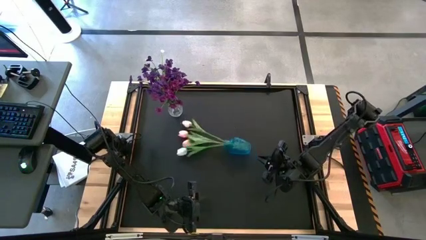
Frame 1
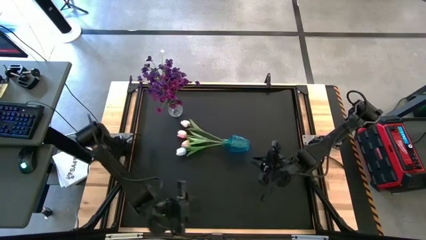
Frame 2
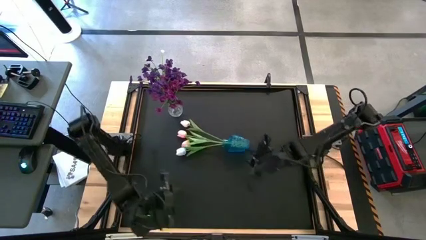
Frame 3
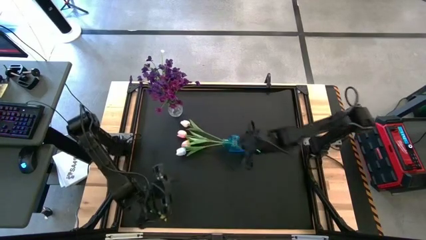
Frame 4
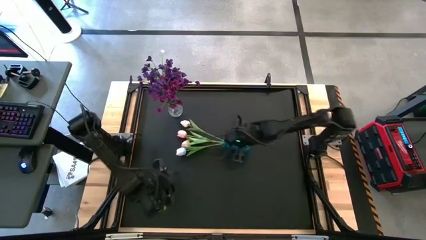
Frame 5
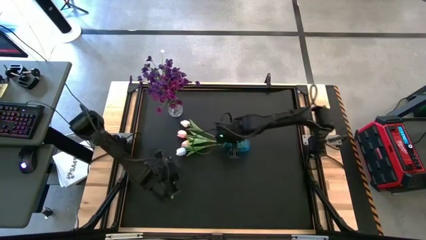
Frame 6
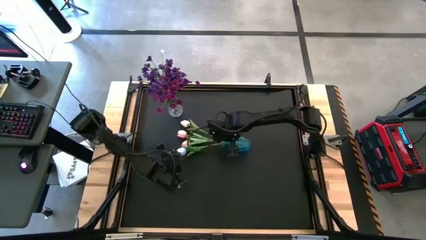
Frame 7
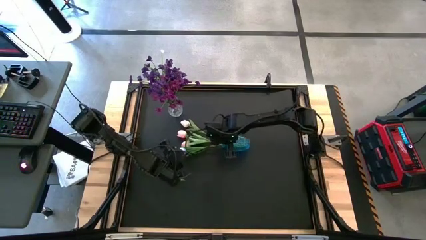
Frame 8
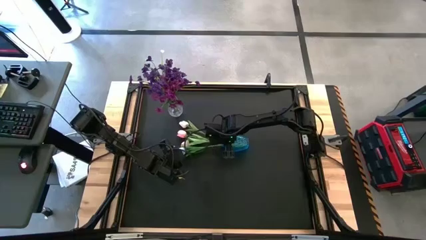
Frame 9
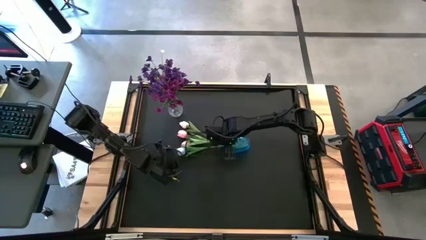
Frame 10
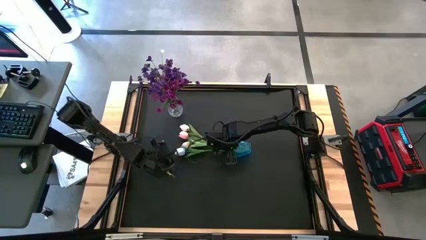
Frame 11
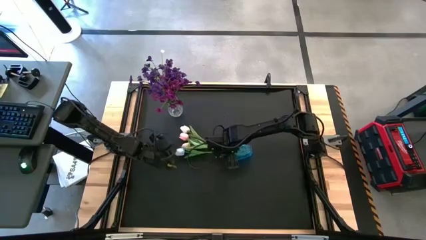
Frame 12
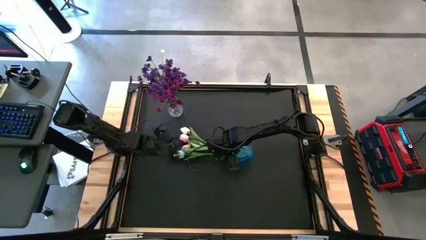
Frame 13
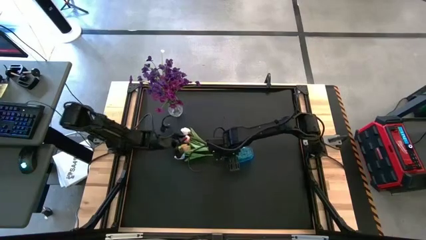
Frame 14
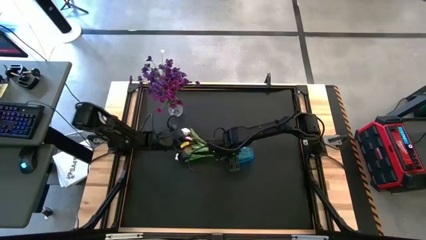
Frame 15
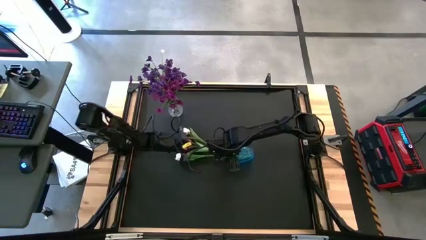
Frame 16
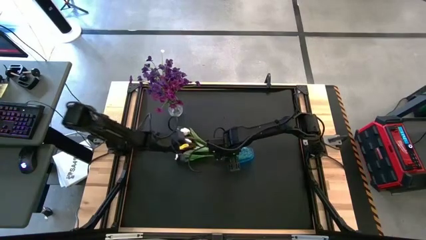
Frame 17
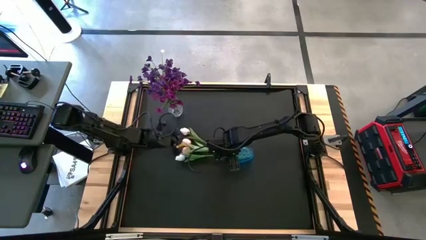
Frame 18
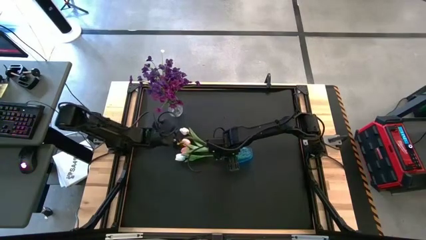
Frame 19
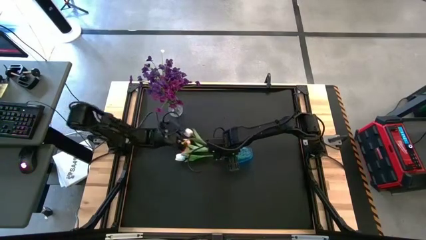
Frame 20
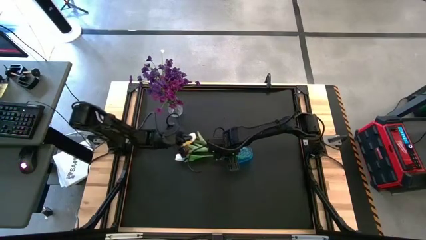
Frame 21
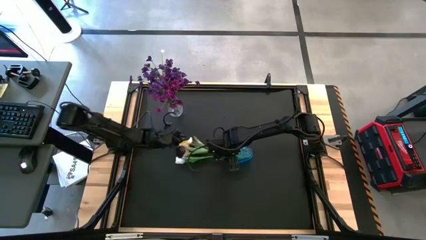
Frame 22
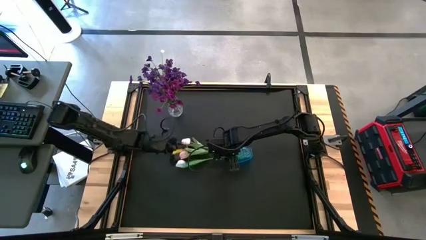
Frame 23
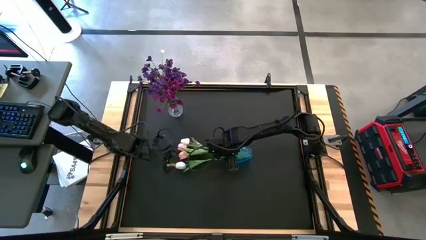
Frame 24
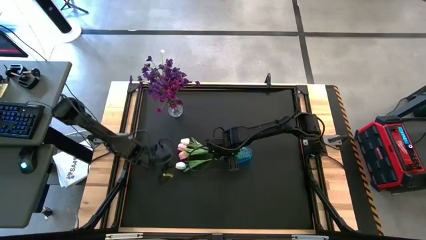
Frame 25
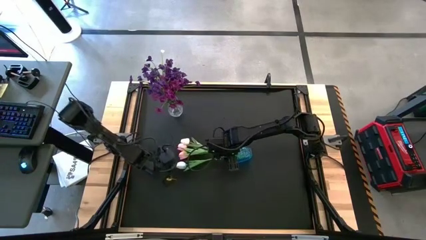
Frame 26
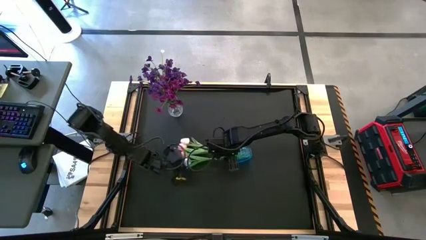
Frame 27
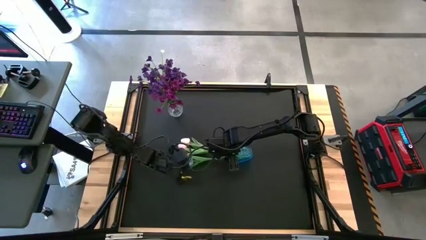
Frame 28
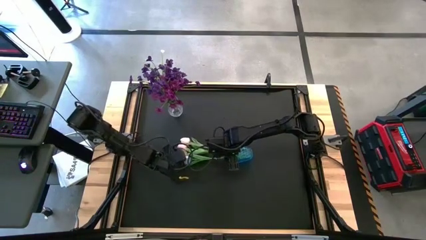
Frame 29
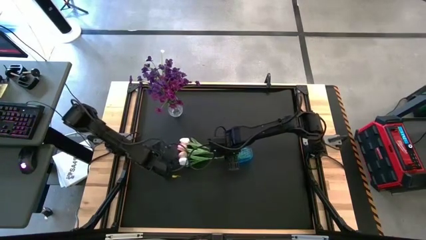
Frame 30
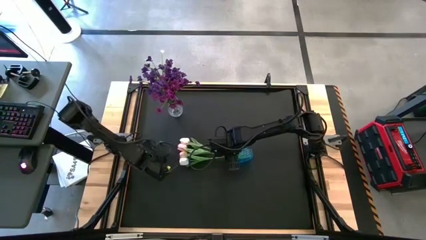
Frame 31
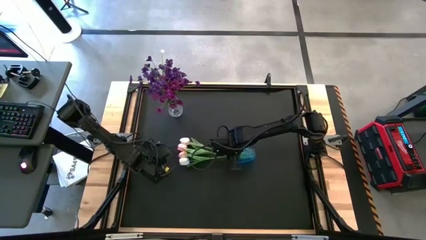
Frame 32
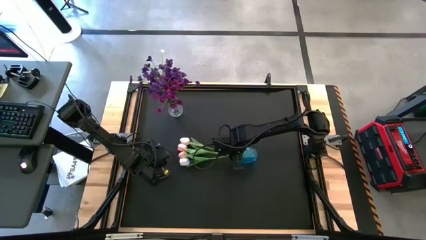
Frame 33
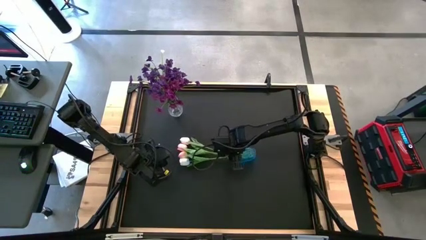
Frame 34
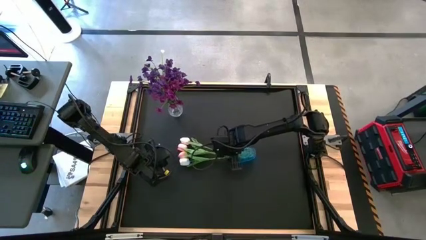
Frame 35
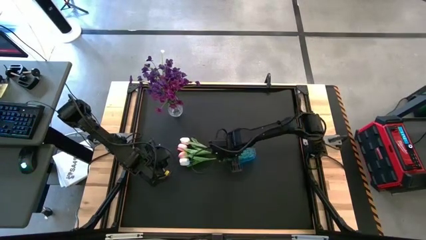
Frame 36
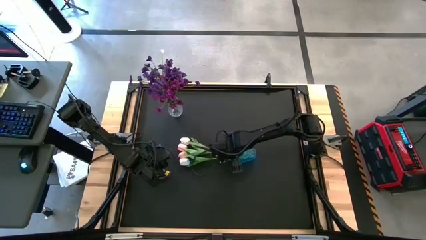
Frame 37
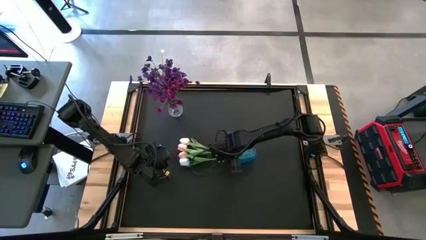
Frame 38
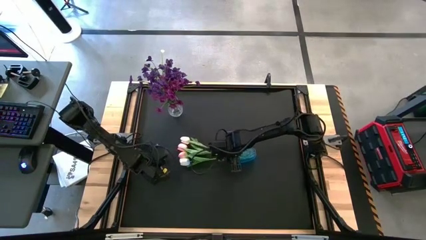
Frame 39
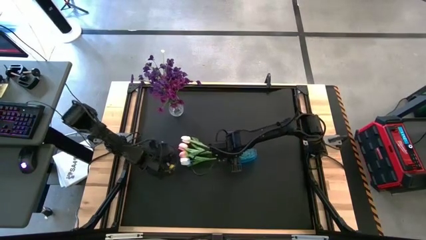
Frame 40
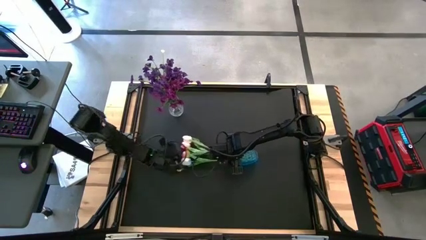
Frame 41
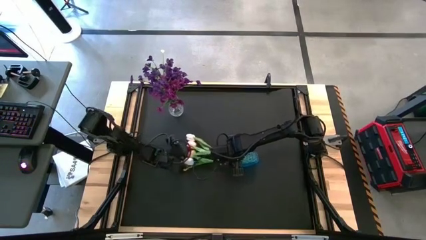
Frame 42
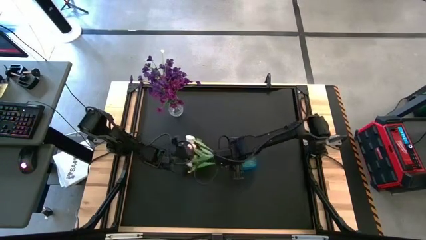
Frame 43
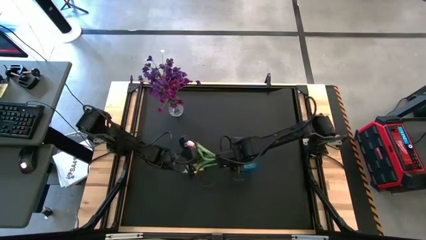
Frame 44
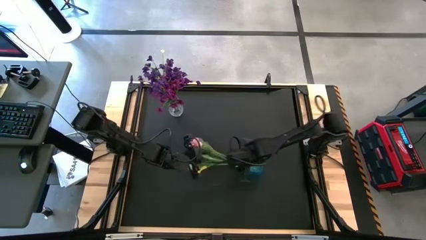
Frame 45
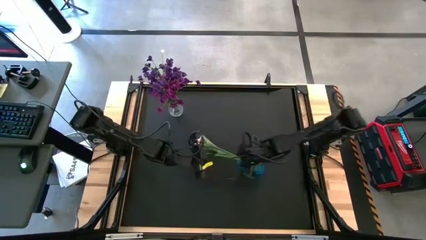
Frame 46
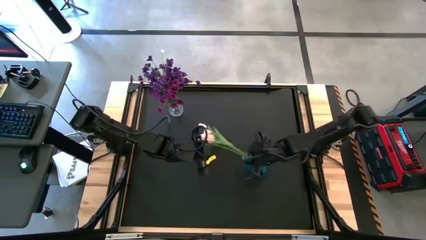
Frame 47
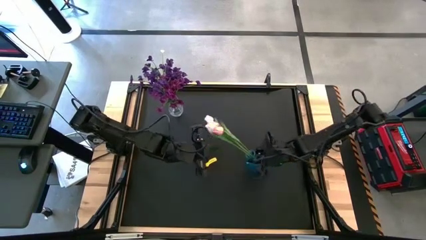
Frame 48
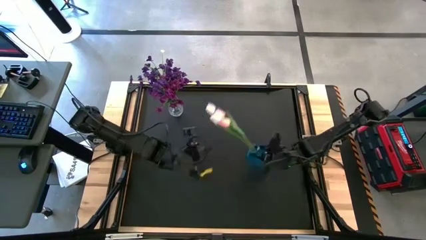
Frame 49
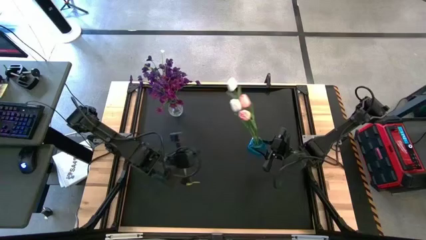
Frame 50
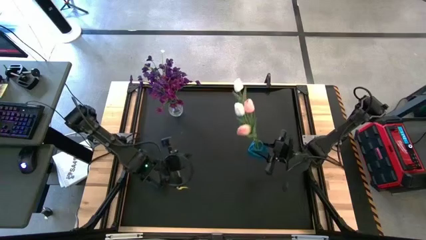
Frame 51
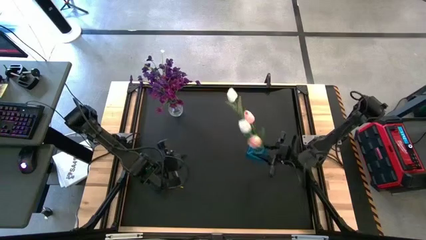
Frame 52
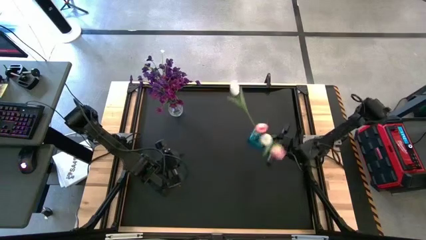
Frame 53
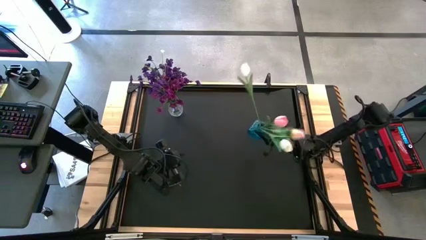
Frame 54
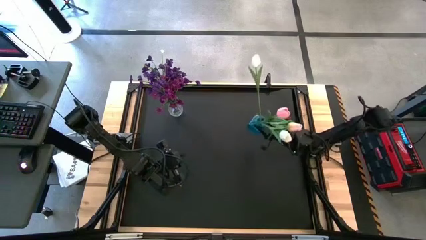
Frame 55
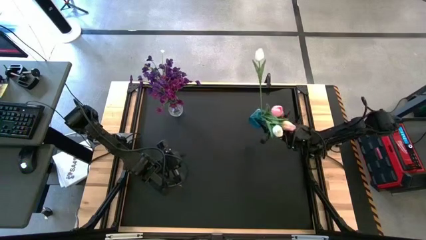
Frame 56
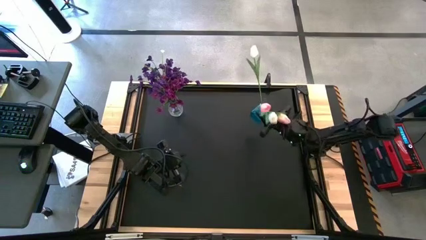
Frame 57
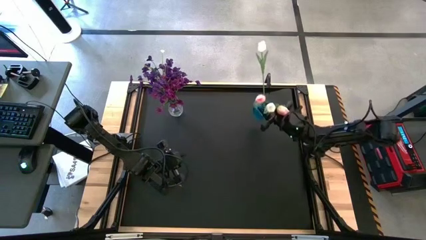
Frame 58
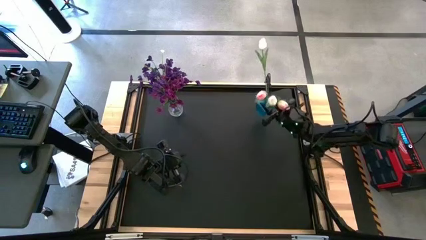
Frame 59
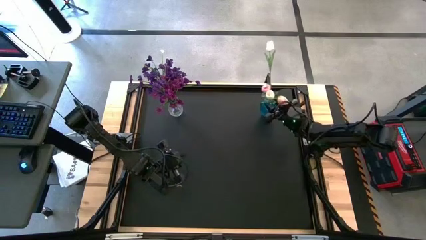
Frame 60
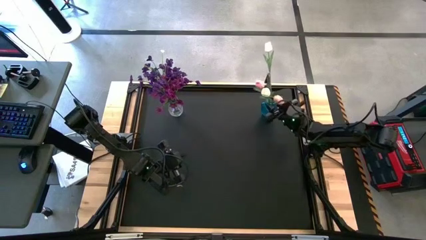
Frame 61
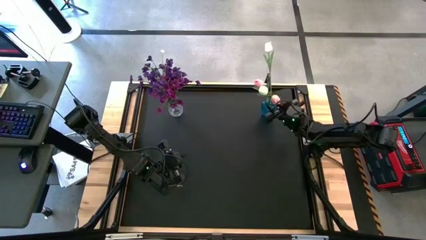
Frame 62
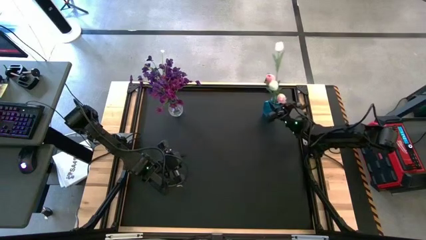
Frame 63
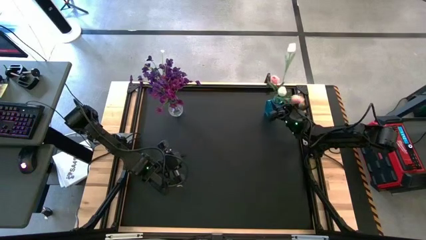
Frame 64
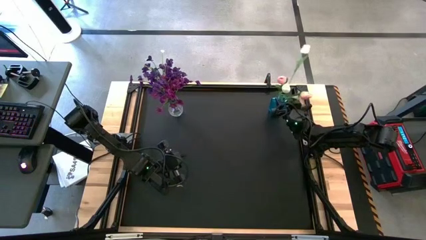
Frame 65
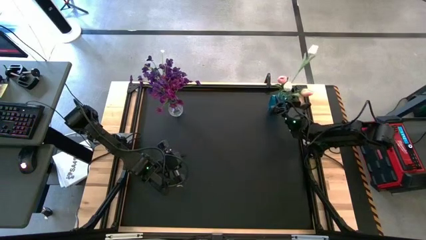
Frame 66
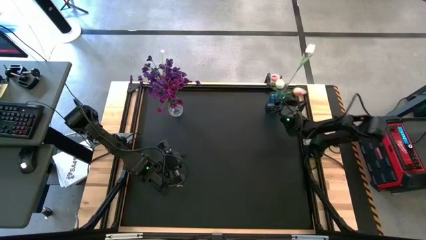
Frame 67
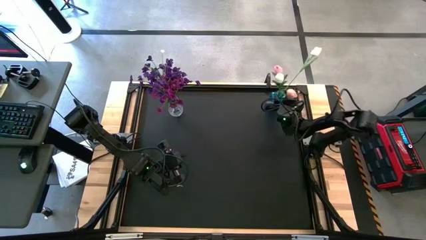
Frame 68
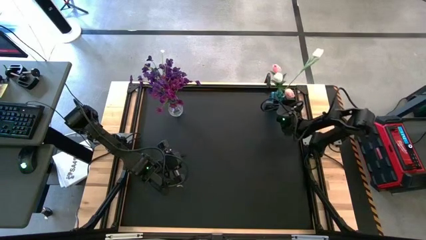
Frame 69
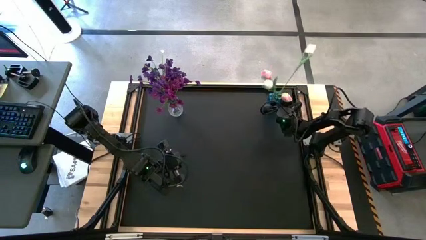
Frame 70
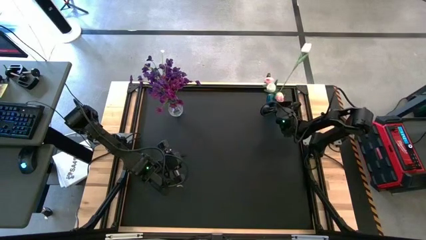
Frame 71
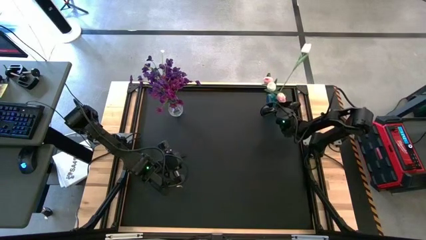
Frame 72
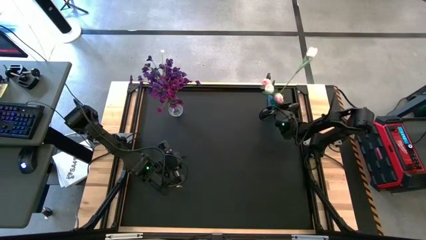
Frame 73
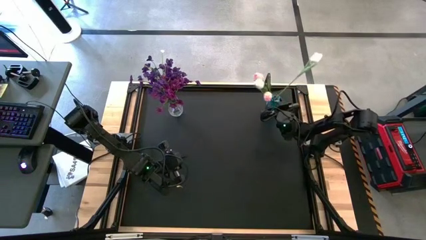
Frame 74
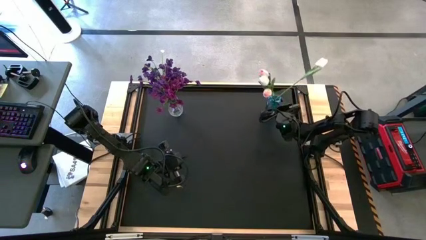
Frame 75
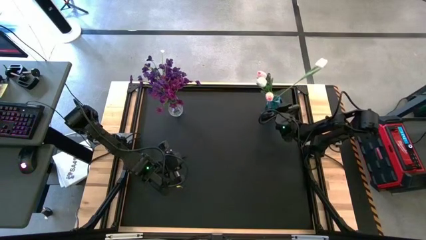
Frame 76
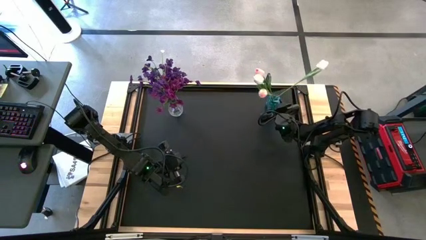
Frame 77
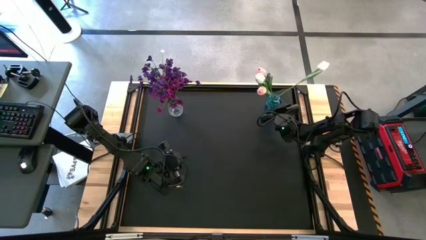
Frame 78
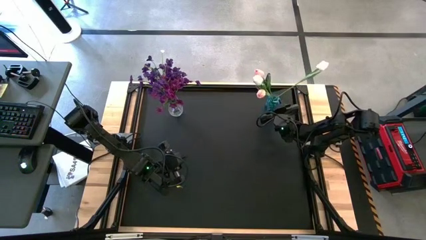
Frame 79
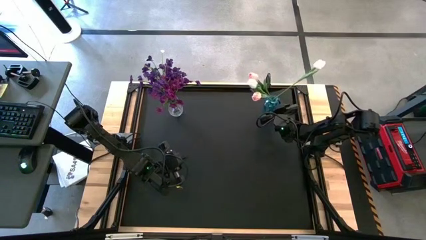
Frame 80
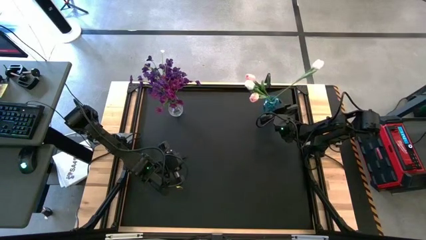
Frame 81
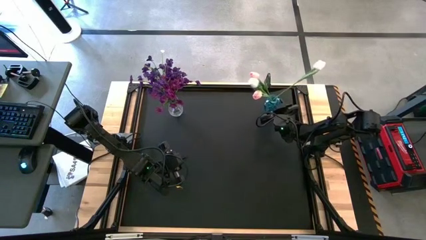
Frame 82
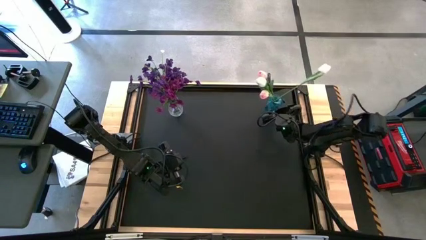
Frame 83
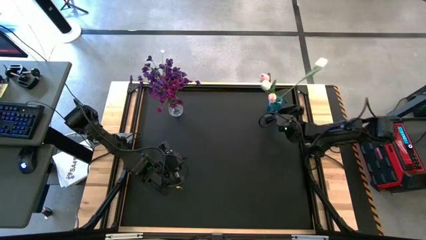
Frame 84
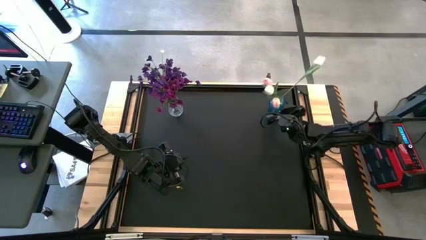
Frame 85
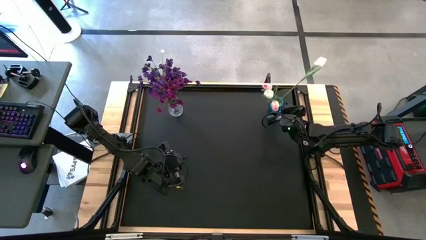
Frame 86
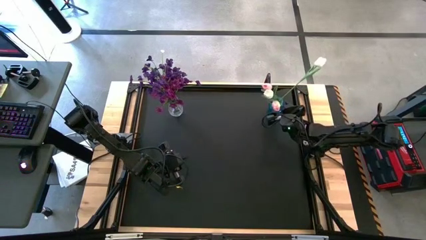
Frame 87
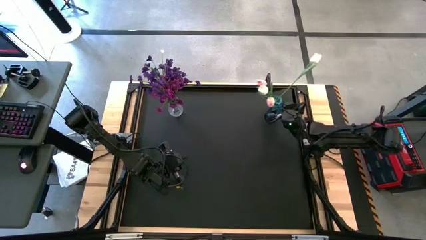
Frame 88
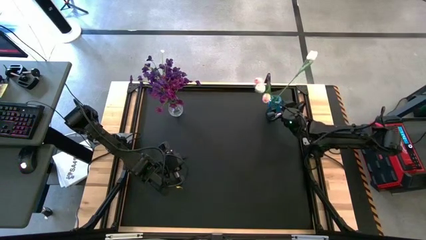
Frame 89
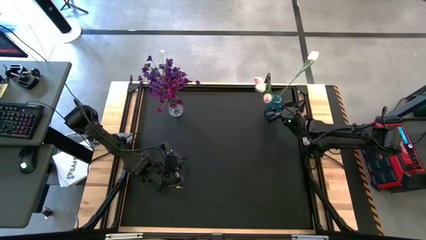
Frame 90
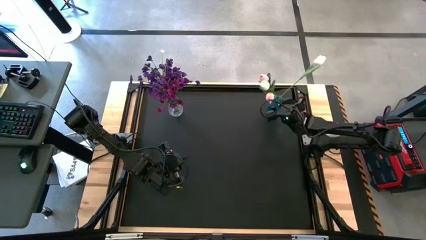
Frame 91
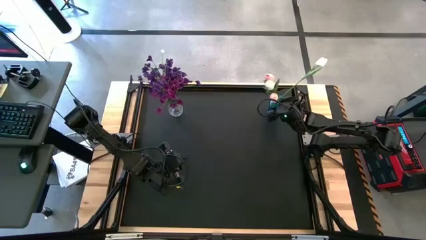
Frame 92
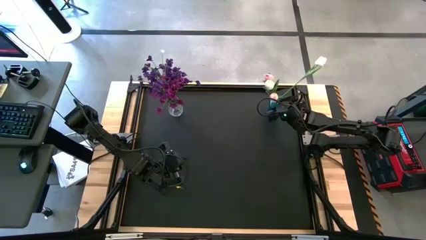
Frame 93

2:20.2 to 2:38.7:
Task: Sort flowers into vase by color
Move the transparent blue vase to the top right of the table
